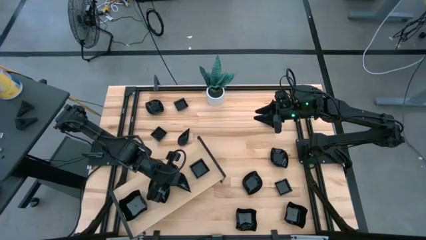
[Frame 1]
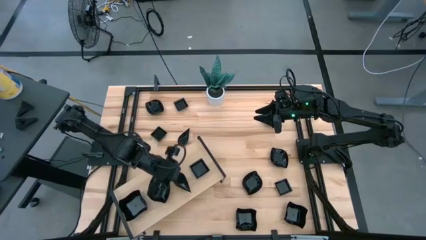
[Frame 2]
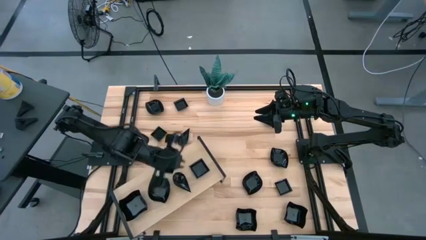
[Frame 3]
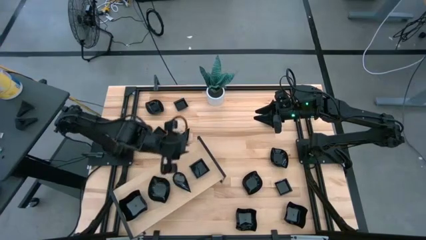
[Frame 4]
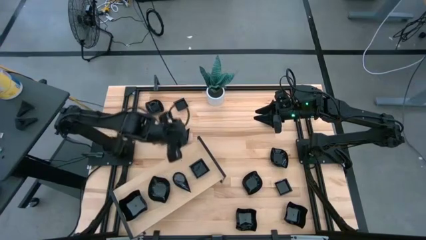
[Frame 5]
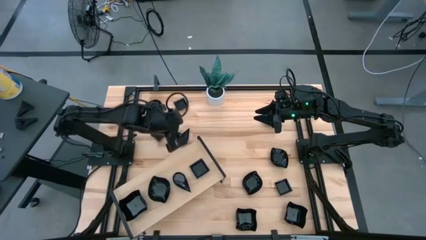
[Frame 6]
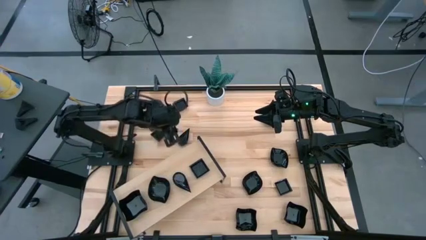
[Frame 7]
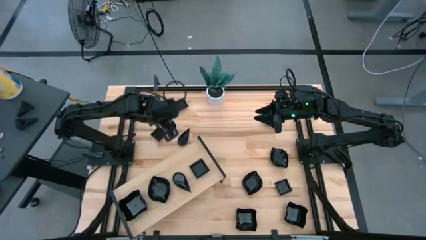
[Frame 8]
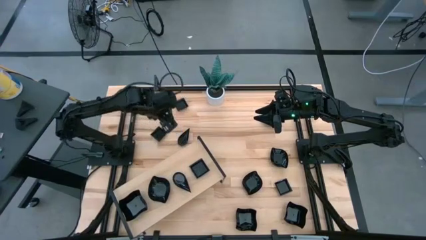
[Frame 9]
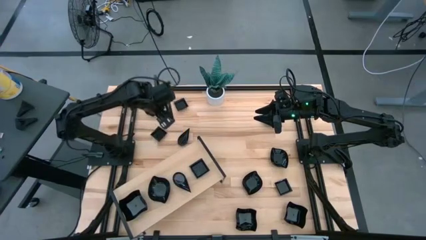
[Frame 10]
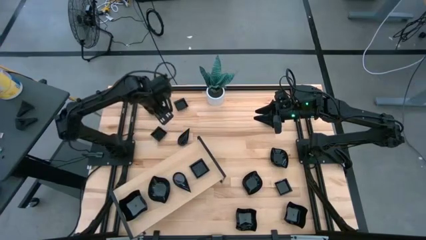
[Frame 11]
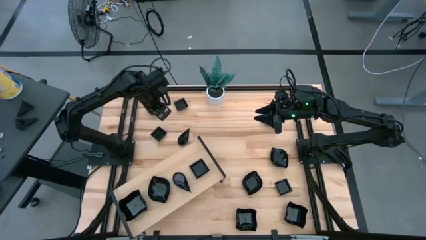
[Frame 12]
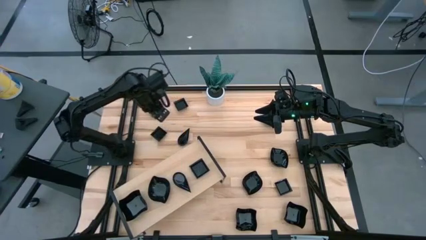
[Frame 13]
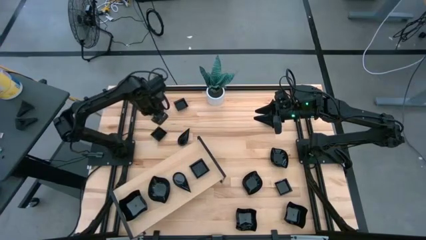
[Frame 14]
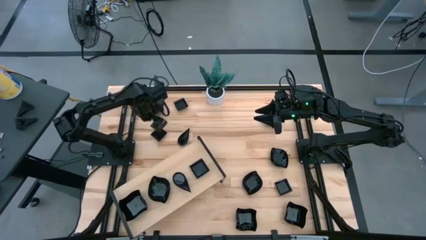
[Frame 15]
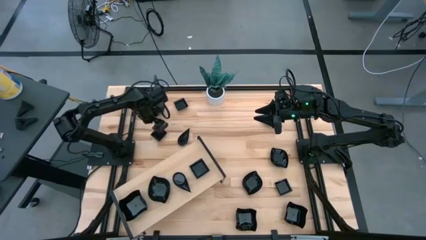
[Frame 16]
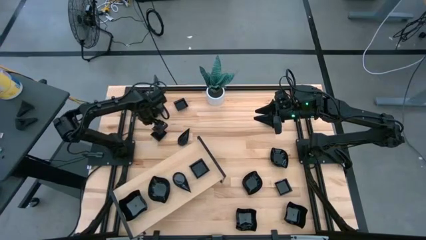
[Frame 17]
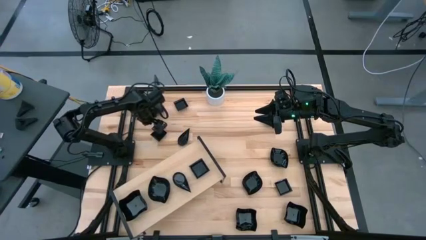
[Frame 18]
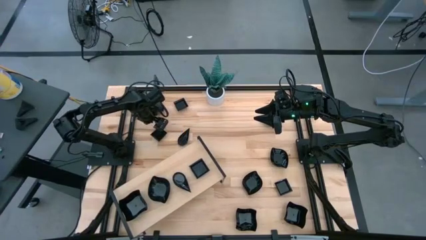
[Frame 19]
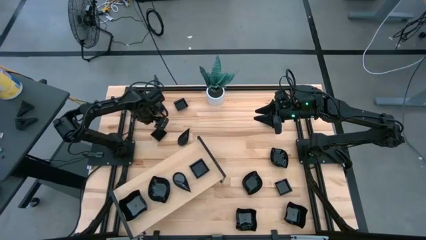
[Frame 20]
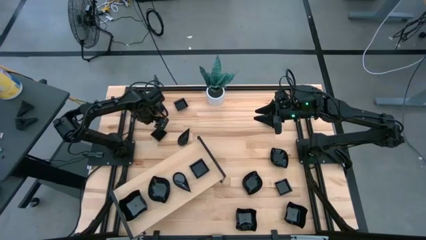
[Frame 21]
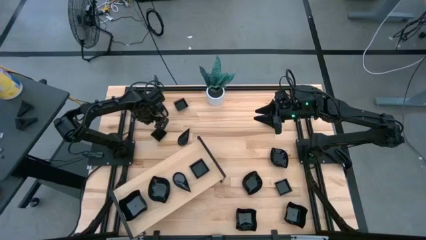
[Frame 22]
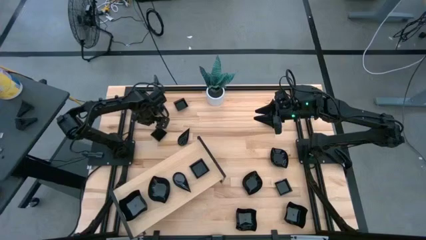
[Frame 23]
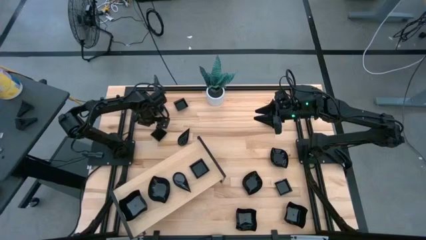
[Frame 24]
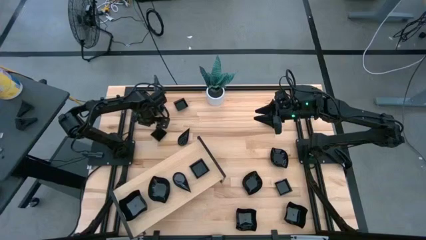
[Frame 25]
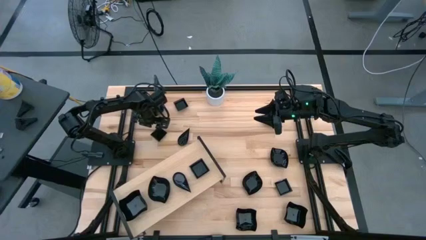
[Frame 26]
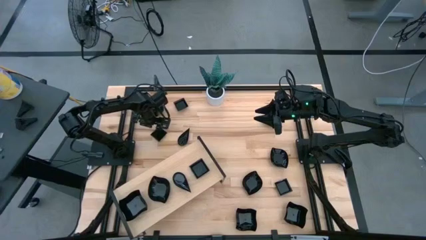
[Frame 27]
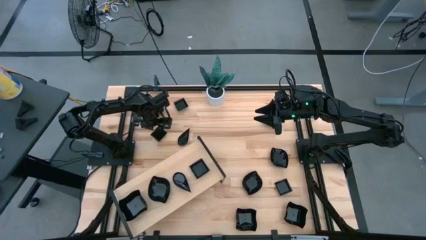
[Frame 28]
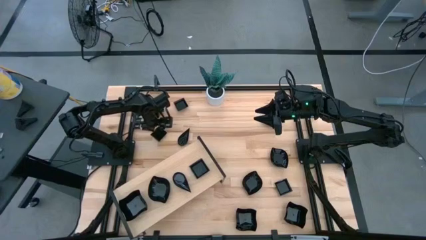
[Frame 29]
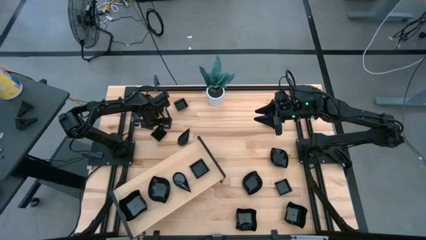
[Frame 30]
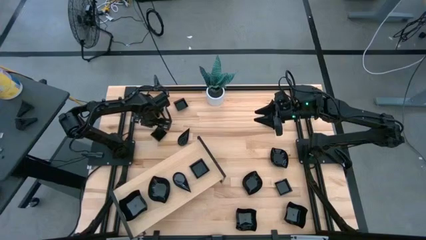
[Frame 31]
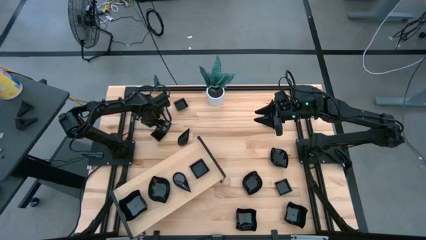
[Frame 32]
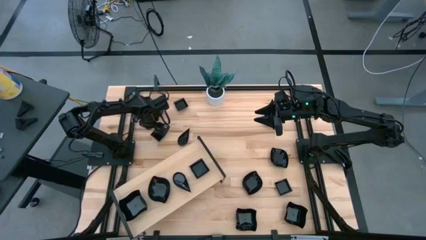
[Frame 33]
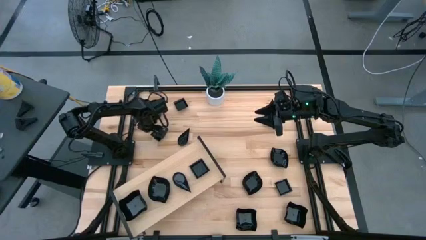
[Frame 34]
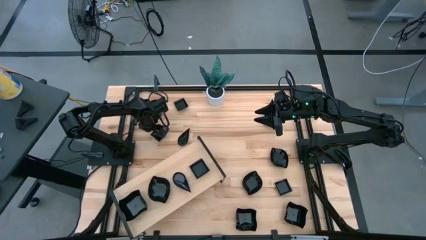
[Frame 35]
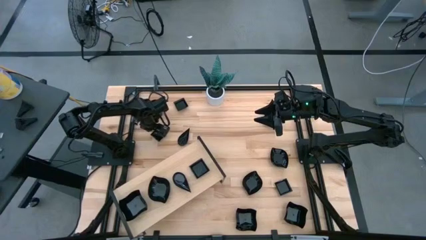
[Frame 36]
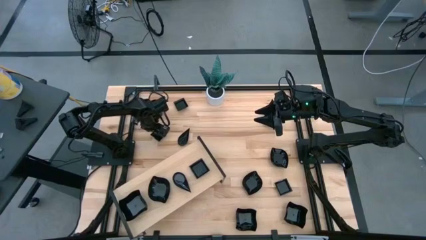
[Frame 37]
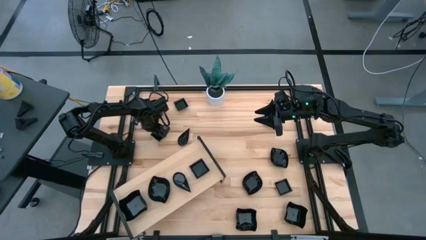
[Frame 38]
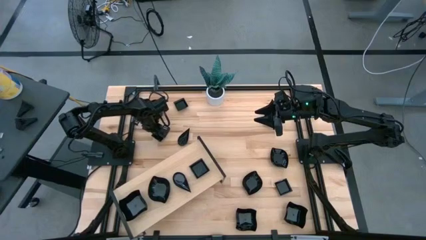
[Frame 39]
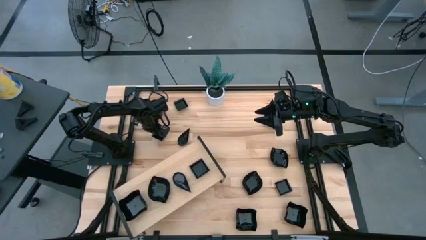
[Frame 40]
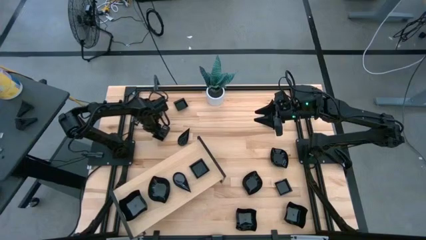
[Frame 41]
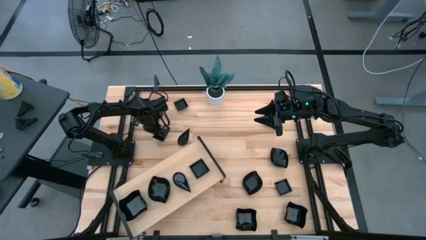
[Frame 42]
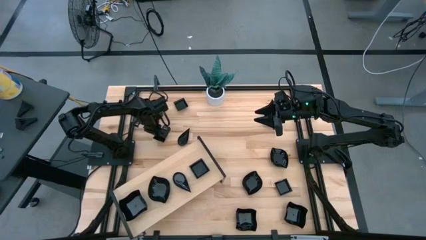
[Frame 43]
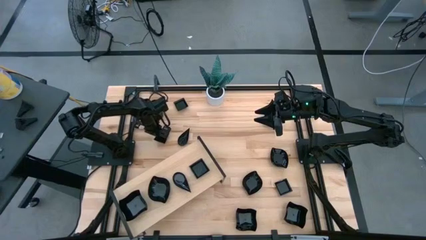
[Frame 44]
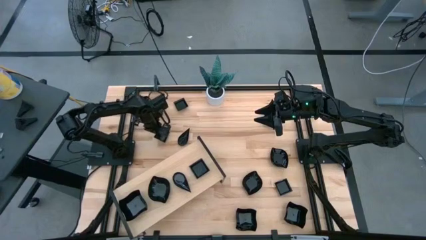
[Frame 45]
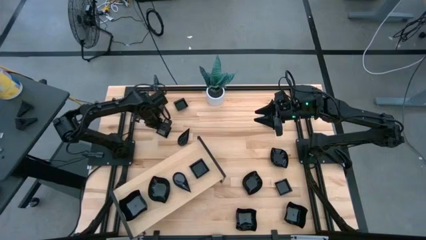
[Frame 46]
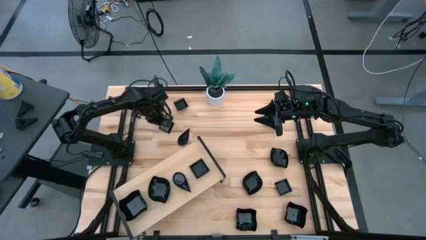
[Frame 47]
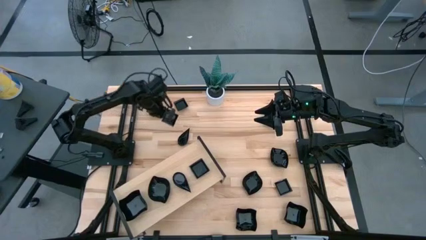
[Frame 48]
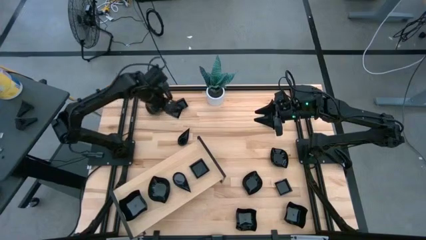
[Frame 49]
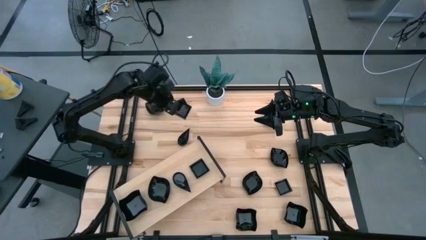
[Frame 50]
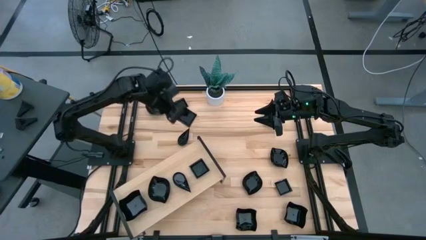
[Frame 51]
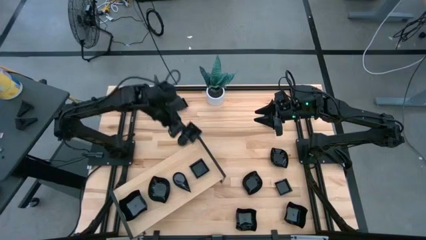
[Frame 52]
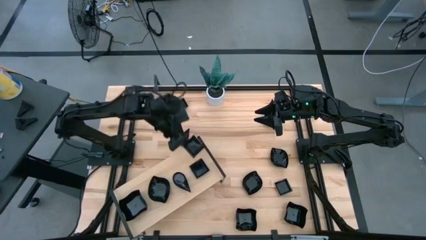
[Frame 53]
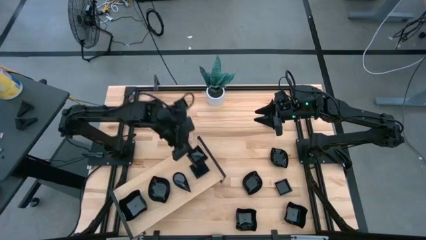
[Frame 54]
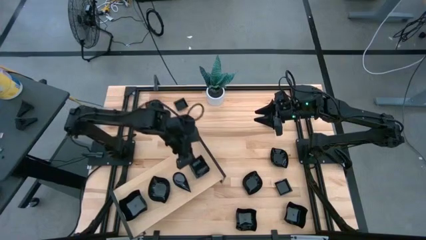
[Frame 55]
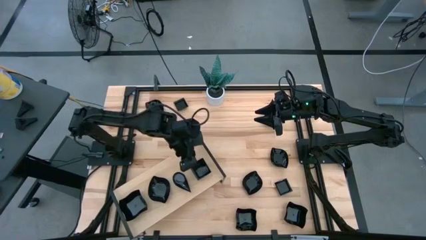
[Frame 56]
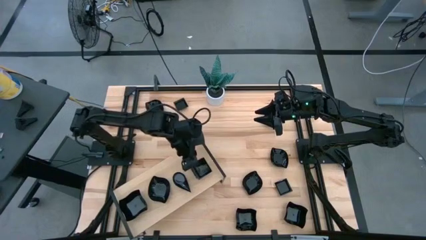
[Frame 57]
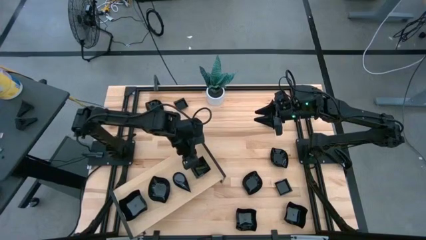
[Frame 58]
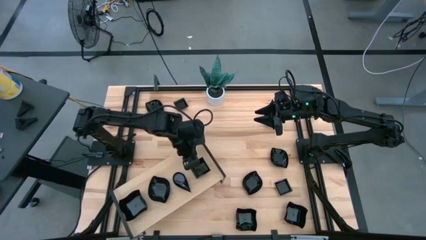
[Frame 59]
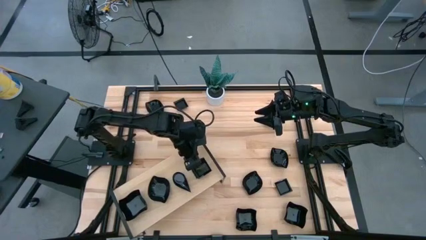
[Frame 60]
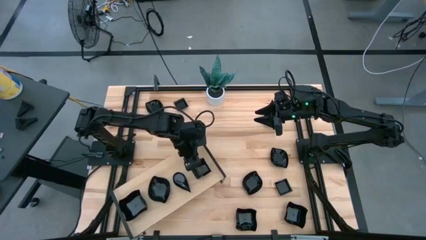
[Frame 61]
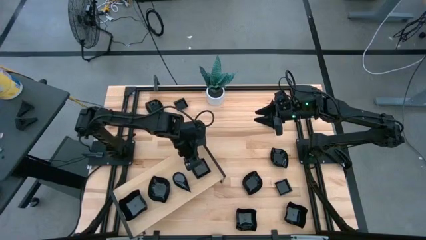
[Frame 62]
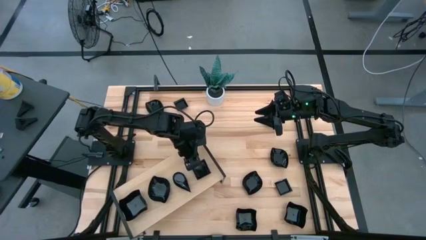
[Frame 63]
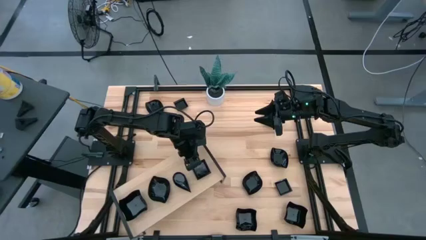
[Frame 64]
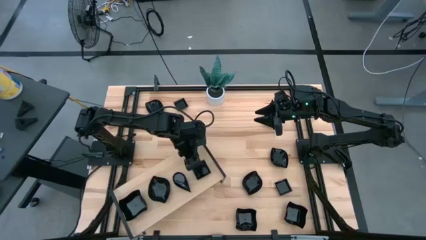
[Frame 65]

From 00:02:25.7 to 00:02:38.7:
Task: Pick & Place Mini shaped plates
Stack the black square plate on top of the black square plate on the shelf

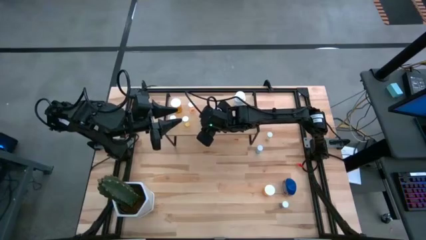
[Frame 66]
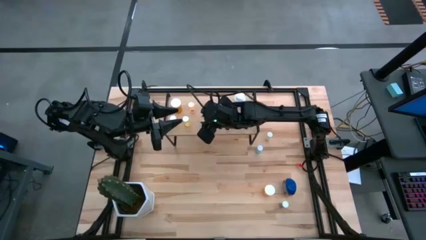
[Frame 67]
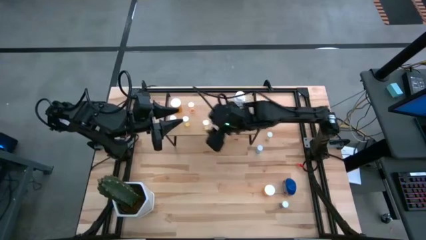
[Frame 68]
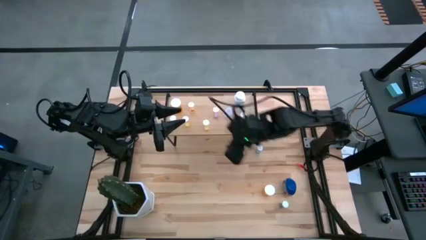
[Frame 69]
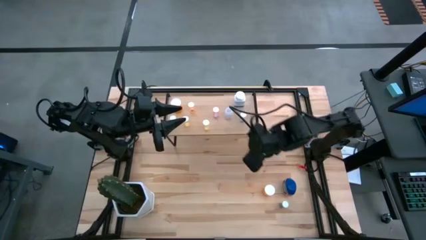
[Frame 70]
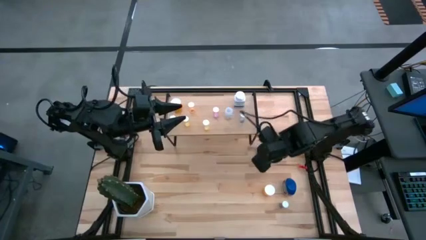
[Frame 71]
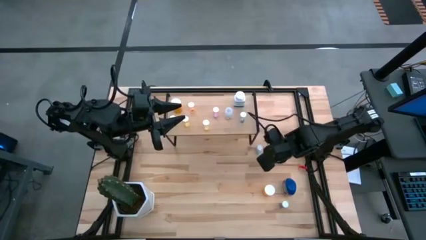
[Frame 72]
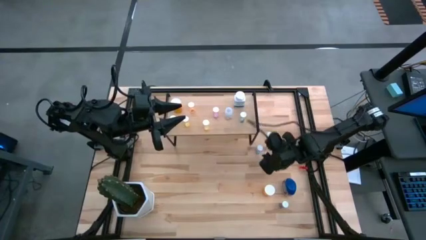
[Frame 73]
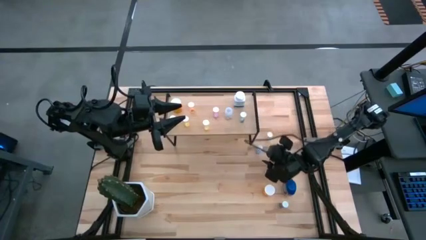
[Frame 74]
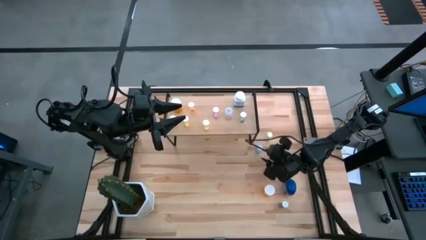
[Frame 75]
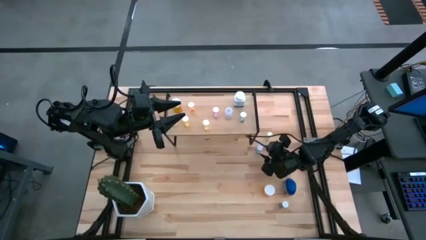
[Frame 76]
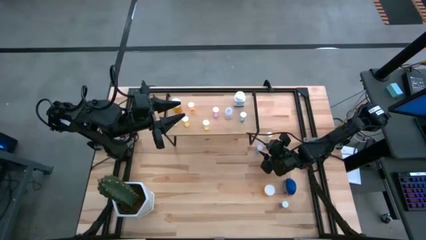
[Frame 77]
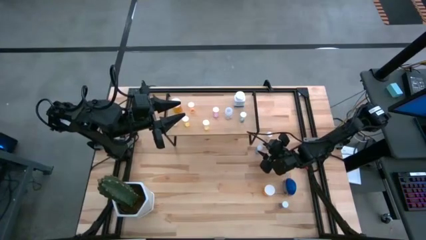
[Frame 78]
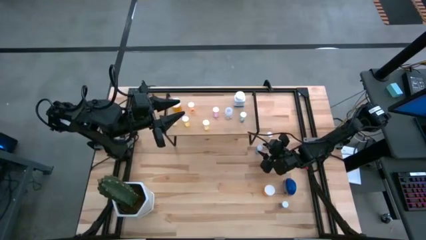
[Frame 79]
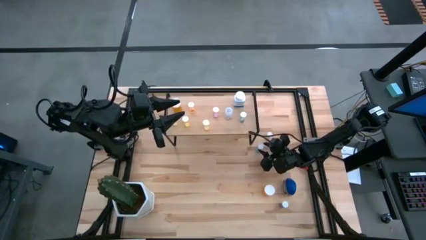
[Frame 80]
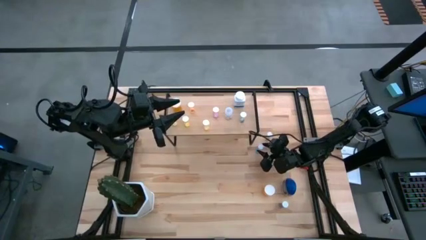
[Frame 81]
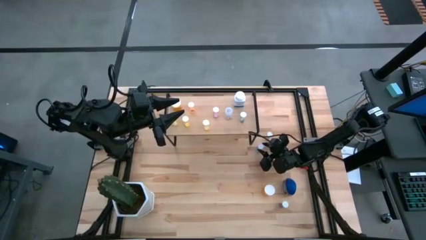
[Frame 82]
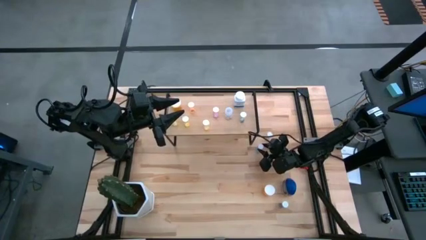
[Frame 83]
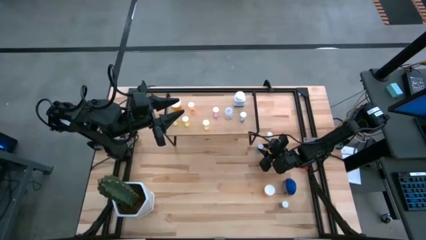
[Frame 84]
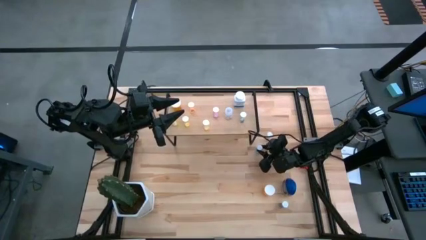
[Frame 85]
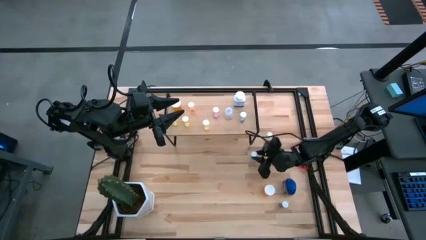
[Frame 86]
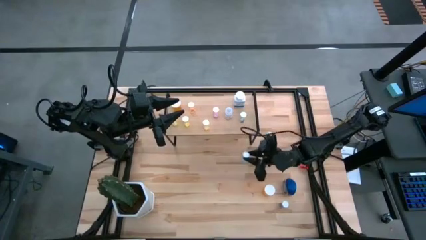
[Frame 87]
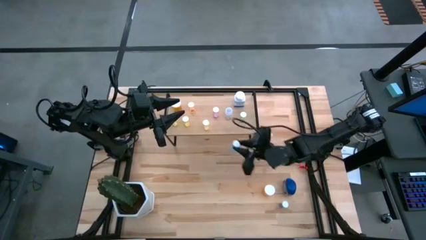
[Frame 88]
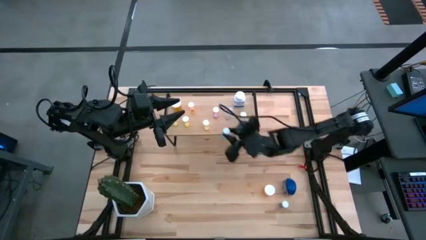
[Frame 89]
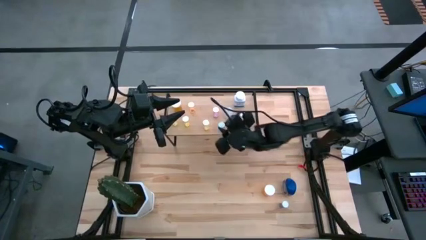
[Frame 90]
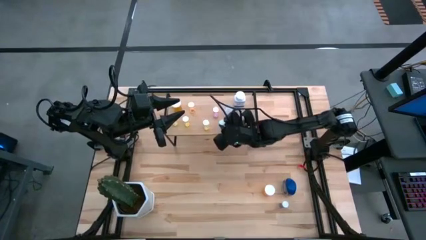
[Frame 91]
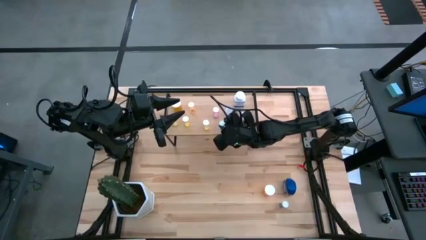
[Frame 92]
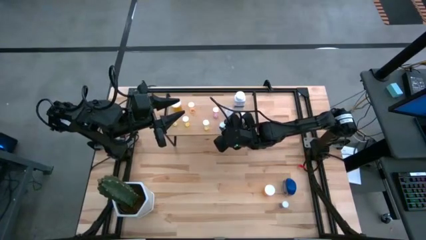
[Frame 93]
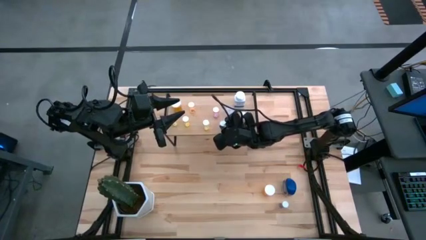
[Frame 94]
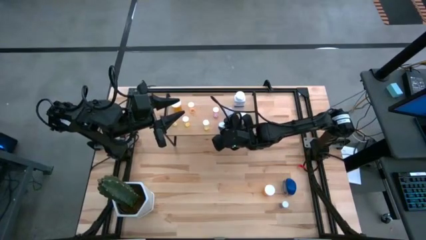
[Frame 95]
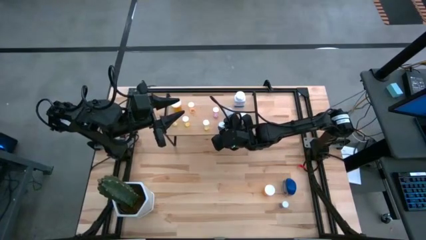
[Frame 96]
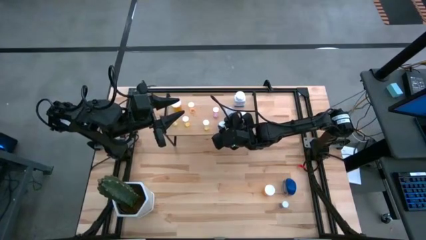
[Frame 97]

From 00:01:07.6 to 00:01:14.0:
Task: Pick and place medicine bottles onto shelf by color
Put the blue pill bottle on the shelf
